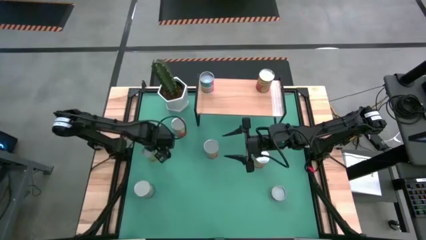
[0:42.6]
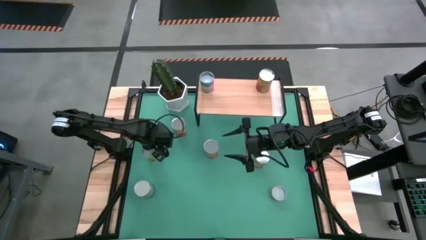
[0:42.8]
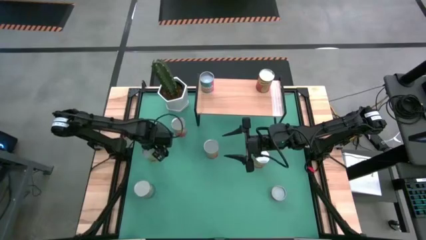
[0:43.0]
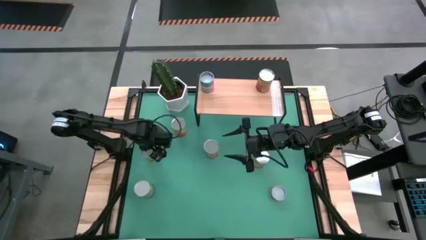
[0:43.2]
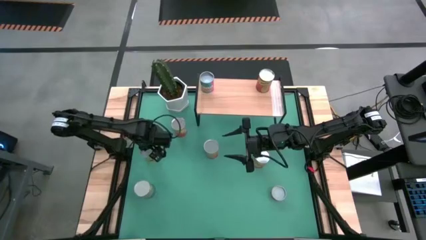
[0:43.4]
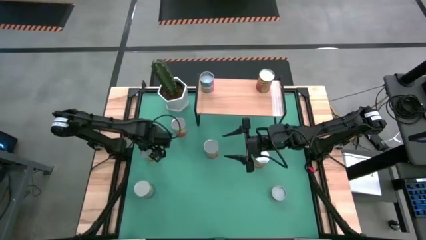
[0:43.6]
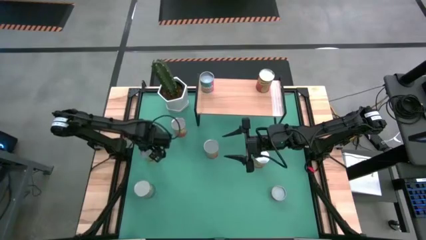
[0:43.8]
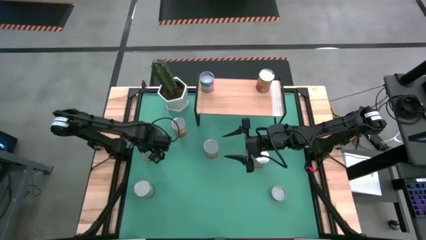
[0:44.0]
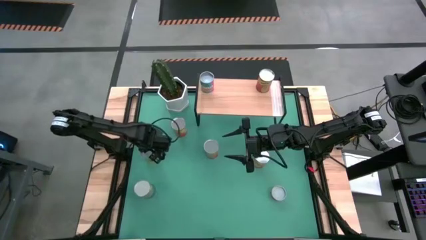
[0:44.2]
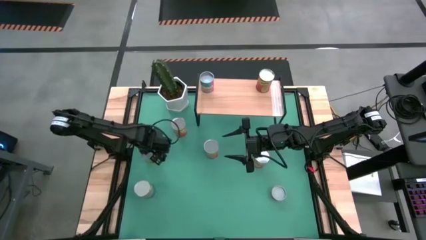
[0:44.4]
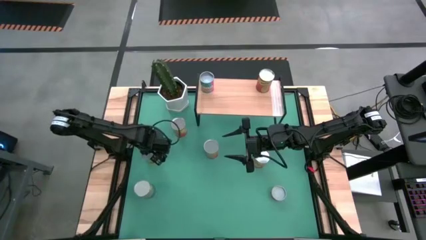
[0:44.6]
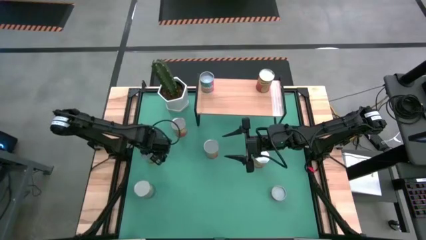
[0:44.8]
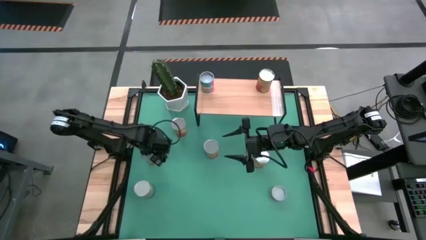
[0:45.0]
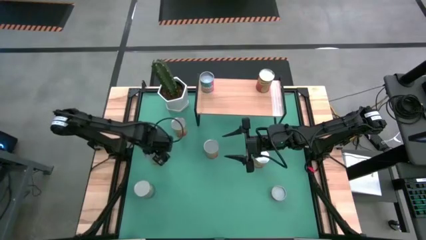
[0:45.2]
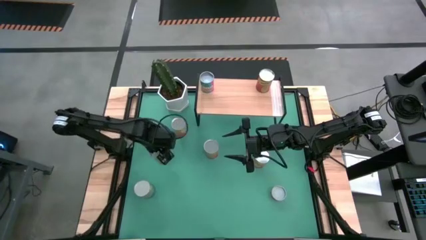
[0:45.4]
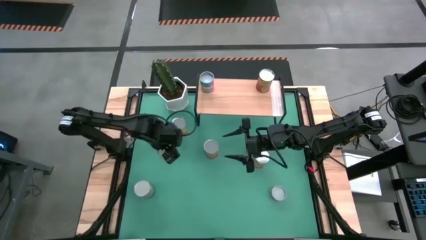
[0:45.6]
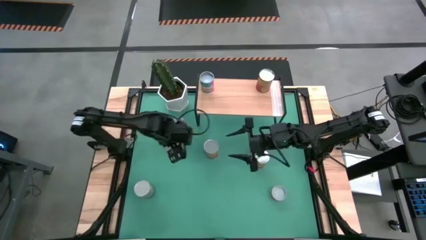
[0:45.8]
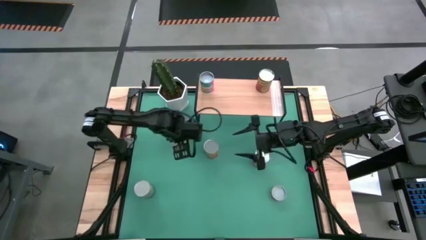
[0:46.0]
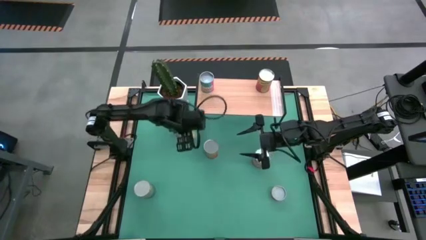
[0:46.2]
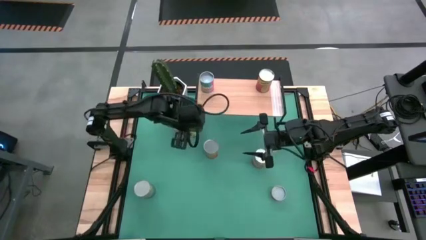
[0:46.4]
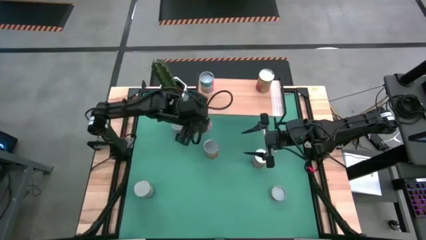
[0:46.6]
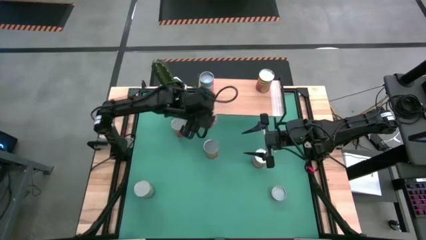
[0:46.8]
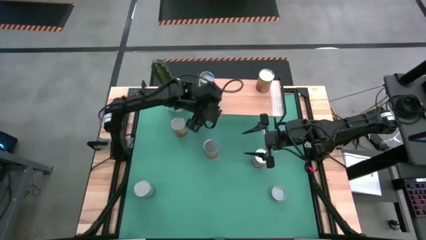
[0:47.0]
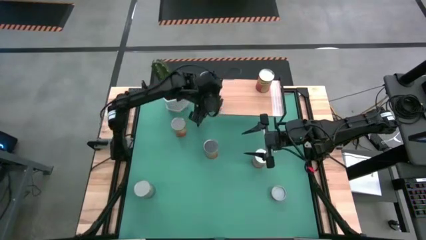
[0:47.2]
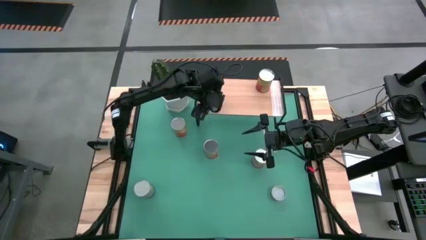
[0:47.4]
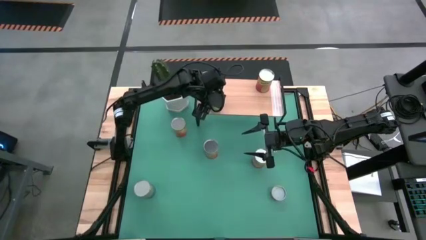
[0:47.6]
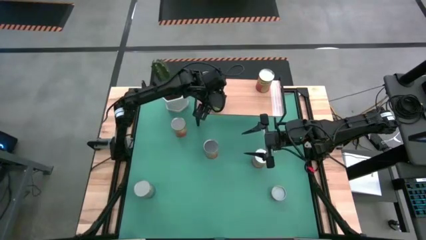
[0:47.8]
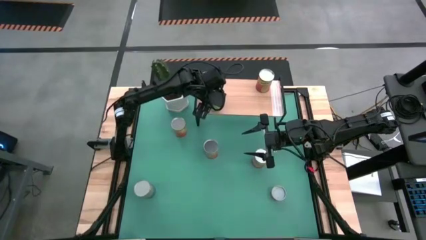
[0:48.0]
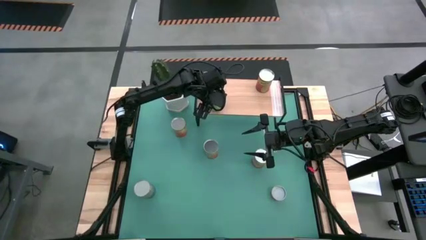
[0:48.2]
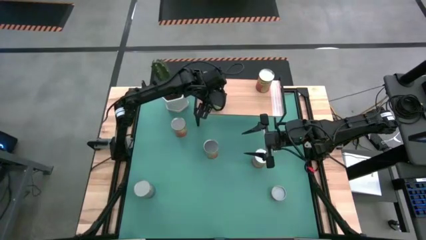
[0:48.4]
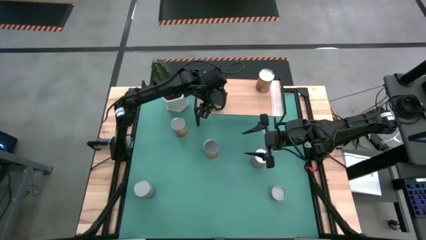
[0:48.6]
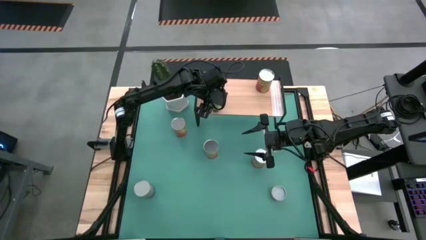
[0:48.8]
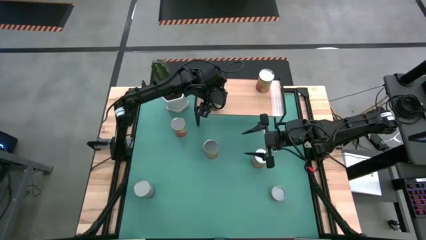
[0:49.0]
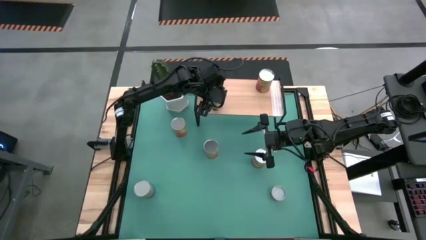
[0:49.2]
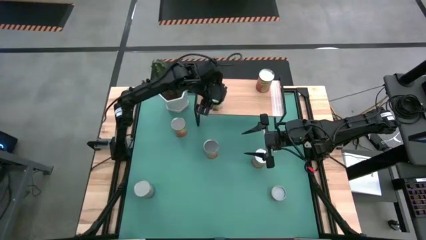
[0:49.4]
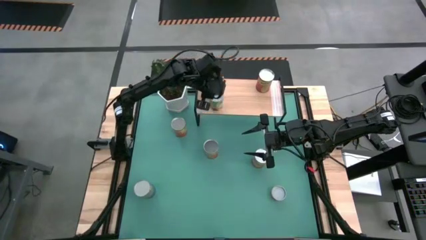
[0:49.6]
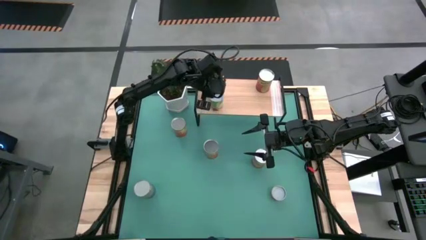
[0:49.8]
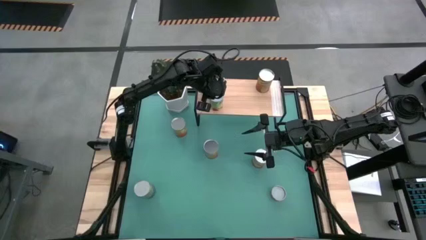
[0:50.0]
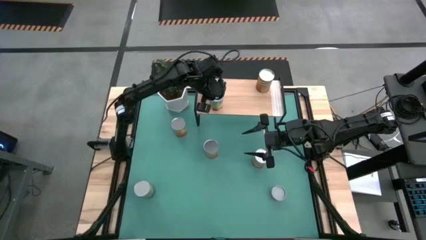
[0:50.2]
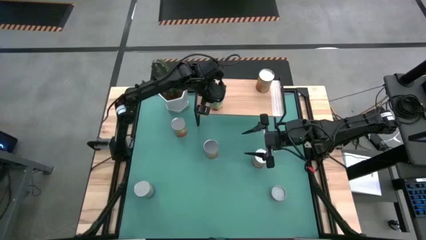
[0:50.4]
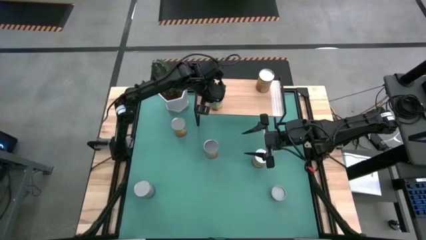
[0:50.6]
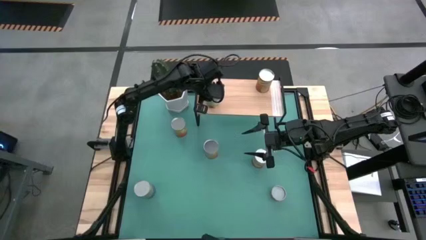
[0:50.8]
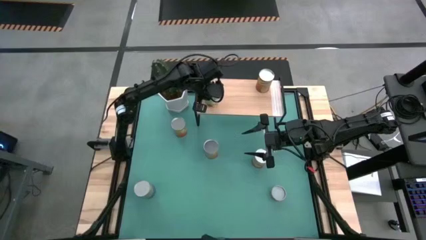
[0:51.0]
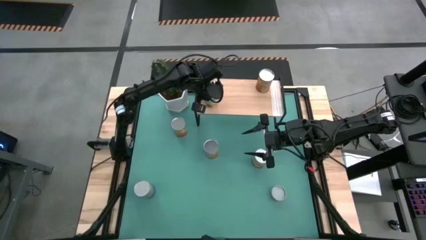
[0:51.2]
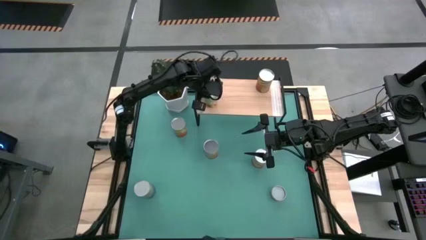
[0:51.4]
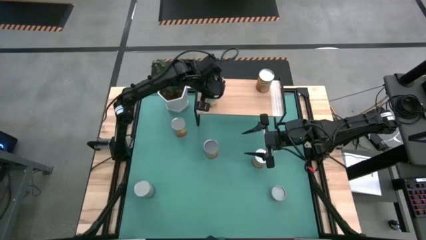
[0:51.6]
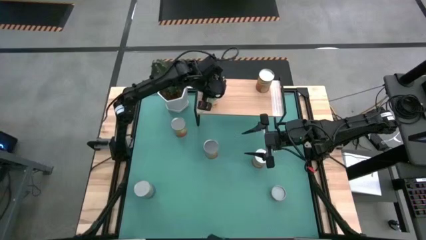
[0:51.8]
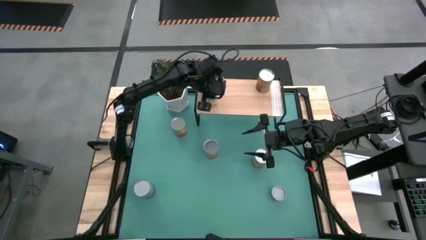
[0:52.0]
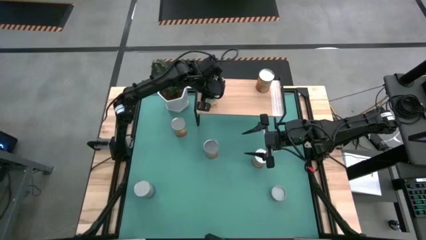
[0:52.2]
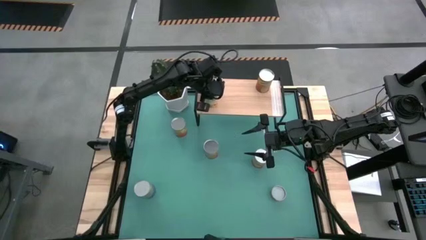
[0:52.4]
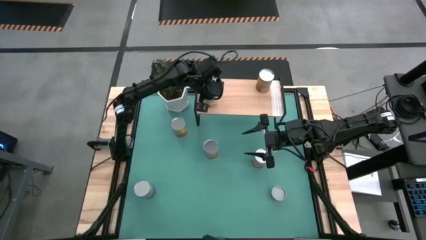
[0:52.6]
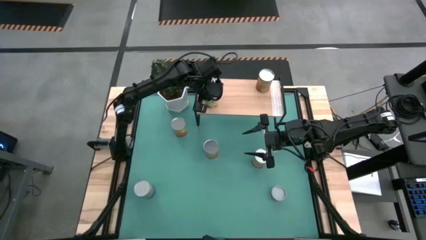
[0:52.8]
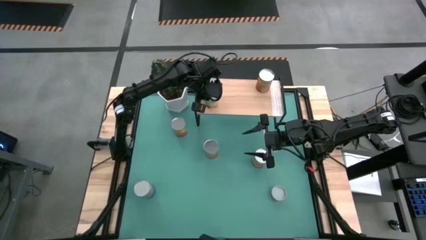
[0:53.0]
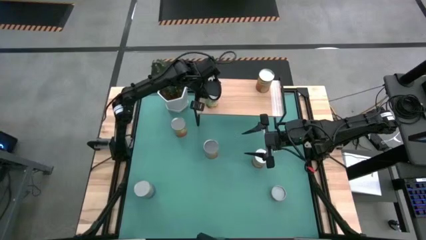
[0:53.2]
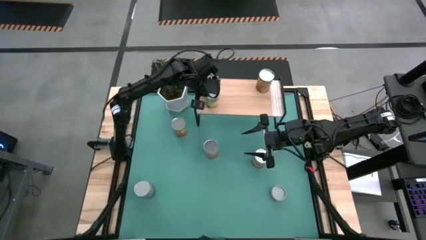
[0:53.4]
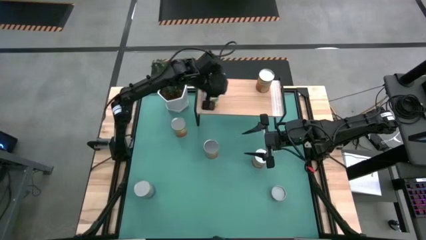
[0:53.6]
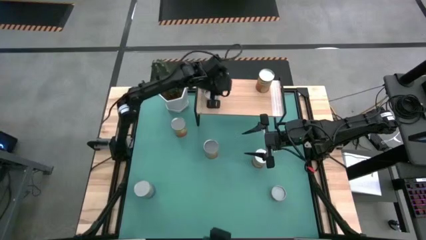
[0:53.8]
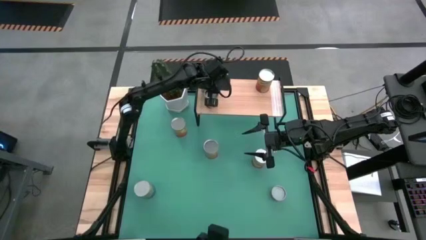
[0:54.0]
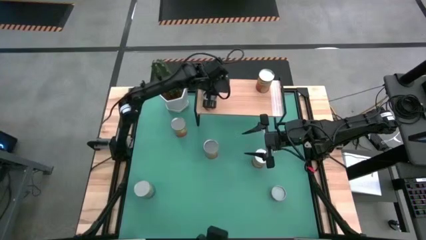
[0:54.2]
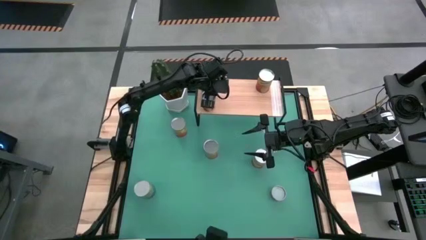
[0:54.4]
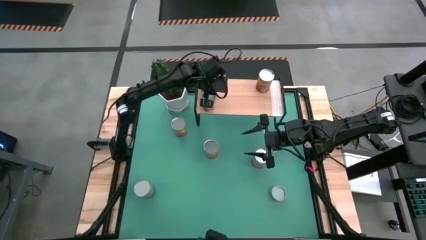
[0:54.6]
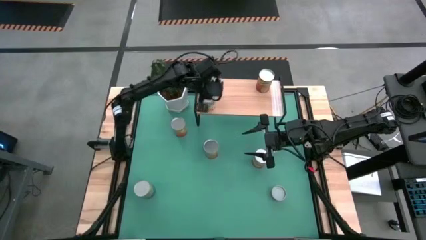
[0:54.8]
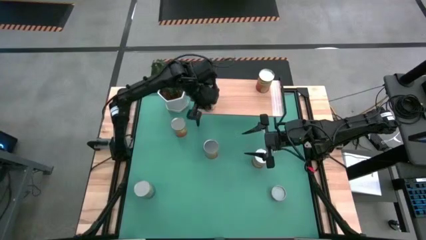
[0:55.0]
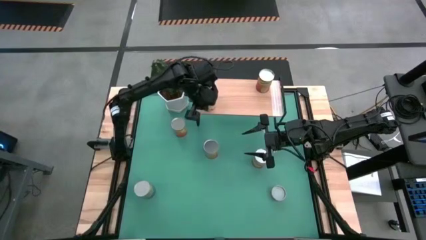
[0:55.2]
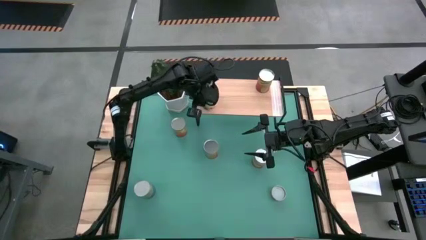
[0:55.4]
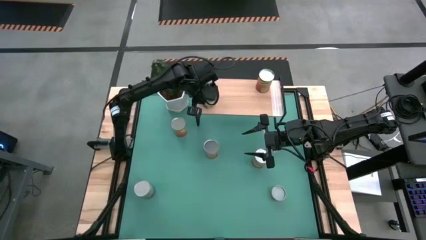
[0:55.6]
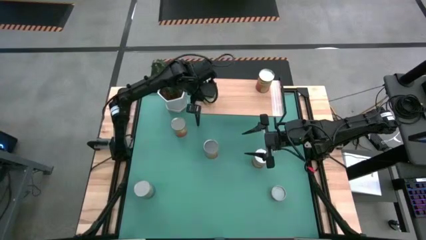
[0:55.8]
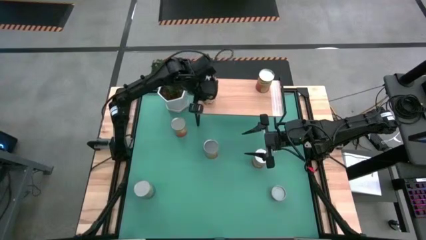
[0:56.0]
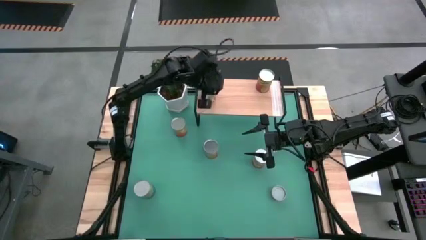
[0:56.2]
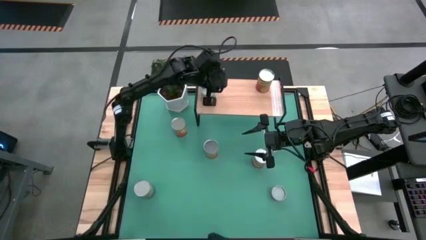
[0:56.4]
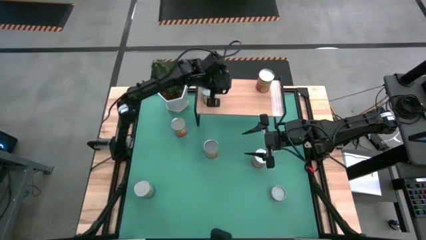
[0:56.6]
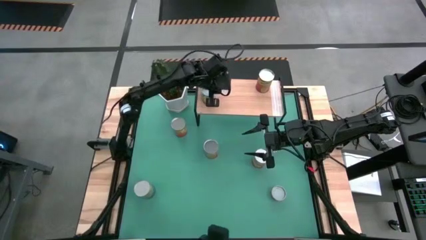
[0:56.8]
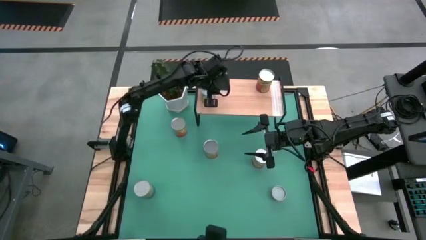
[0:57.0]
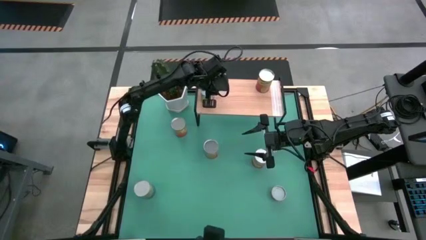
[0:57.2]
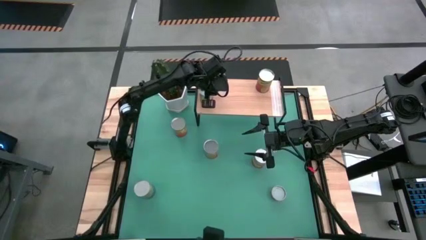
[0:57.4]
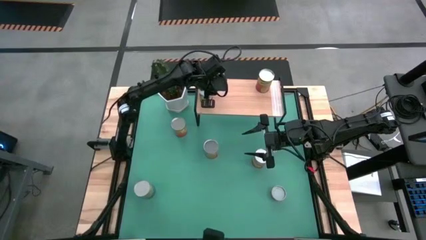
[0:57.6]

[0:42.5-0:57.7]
Task: Pick and place cans onto a shelf
Put the canned spaghetti sauce on the shelf
